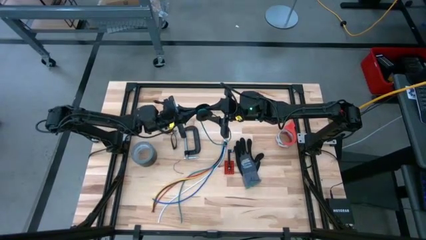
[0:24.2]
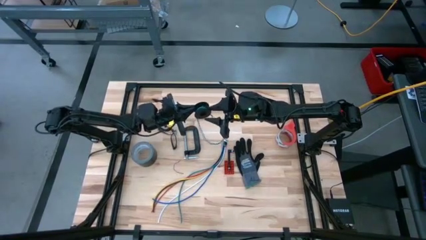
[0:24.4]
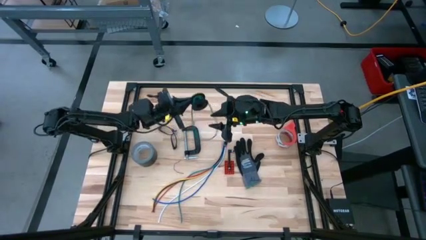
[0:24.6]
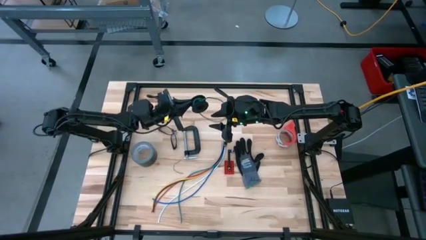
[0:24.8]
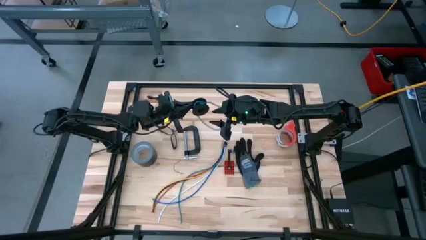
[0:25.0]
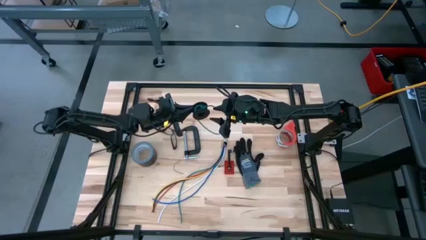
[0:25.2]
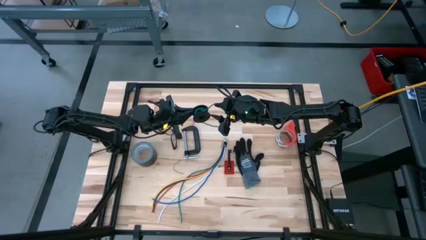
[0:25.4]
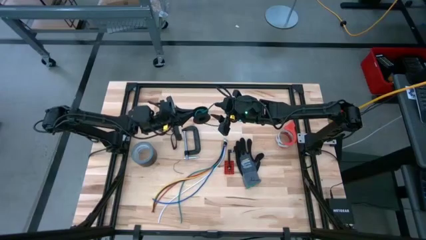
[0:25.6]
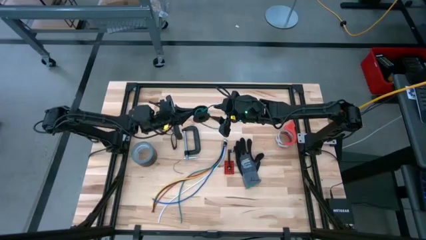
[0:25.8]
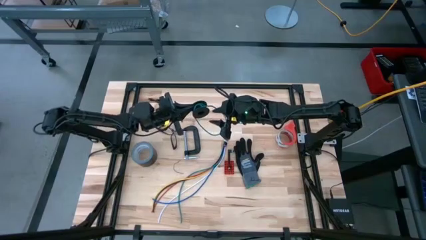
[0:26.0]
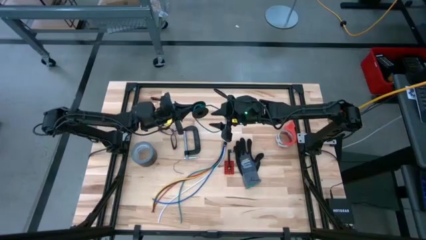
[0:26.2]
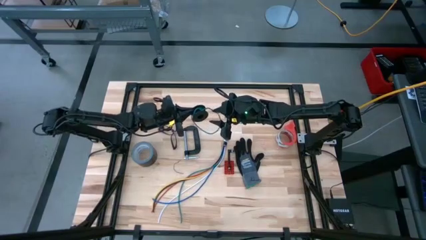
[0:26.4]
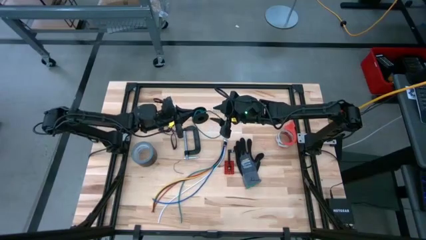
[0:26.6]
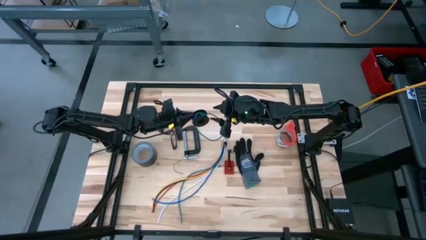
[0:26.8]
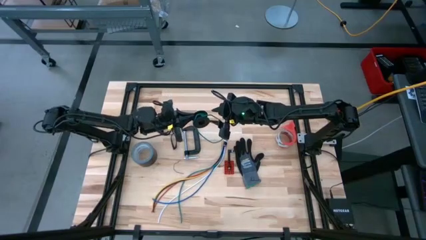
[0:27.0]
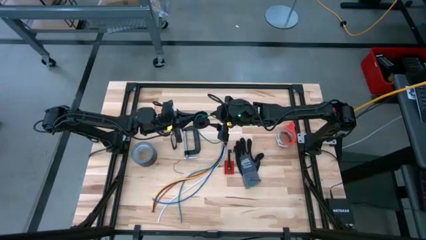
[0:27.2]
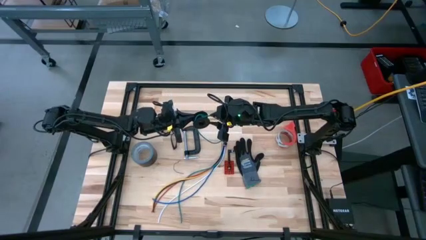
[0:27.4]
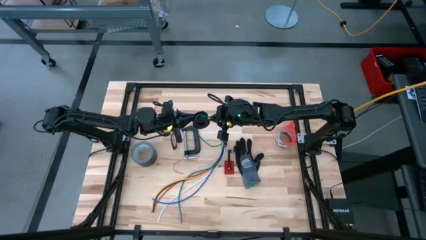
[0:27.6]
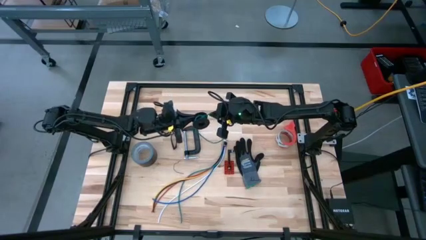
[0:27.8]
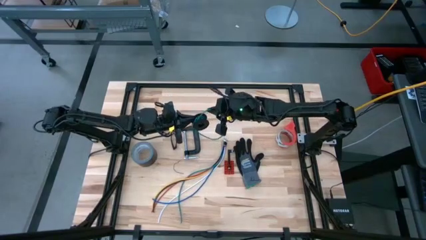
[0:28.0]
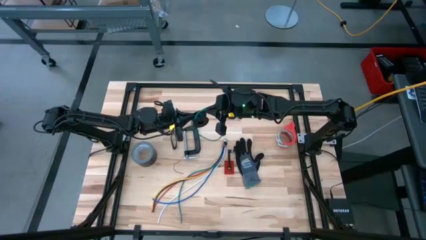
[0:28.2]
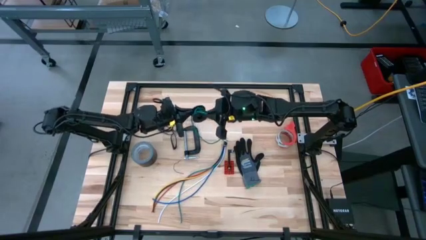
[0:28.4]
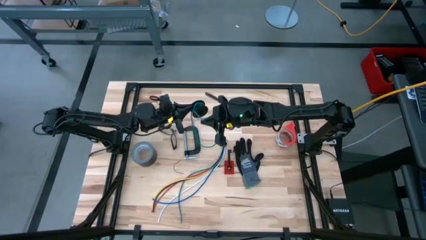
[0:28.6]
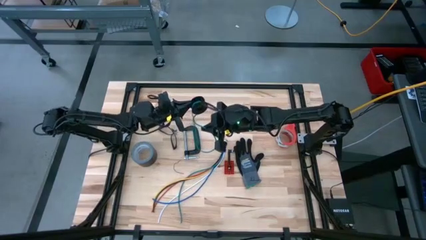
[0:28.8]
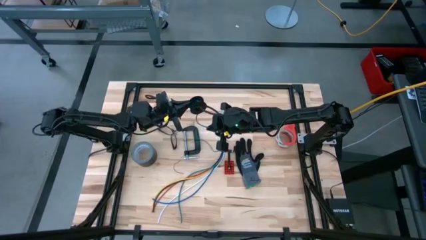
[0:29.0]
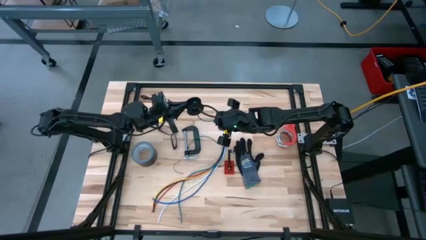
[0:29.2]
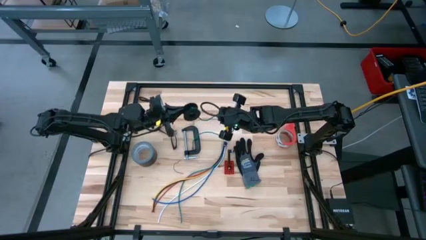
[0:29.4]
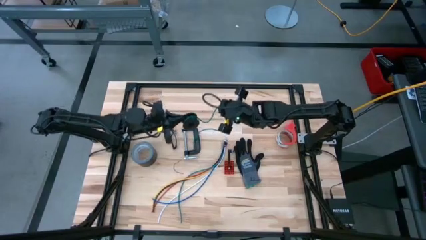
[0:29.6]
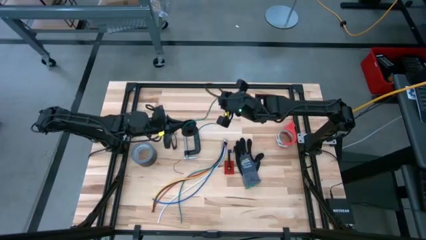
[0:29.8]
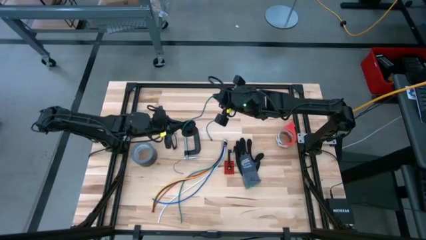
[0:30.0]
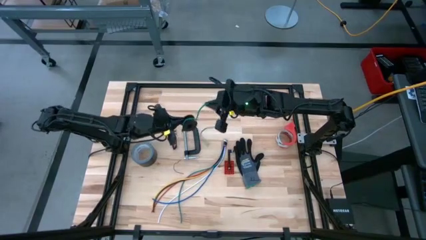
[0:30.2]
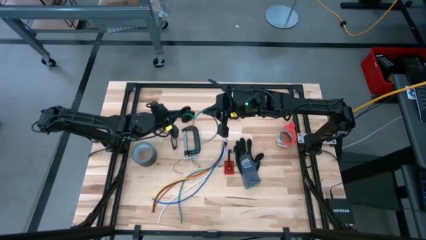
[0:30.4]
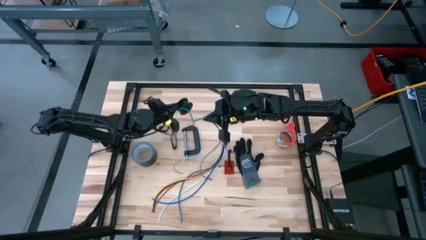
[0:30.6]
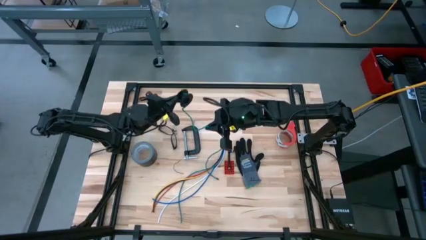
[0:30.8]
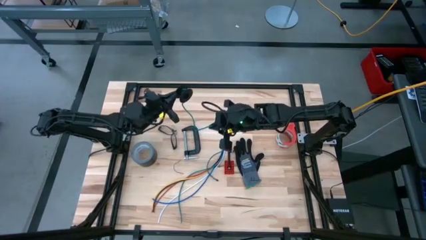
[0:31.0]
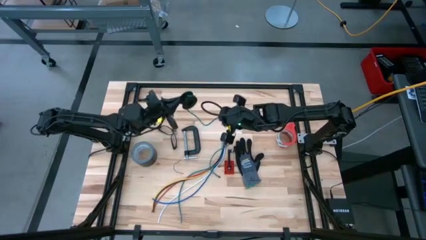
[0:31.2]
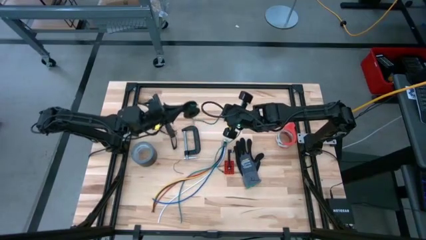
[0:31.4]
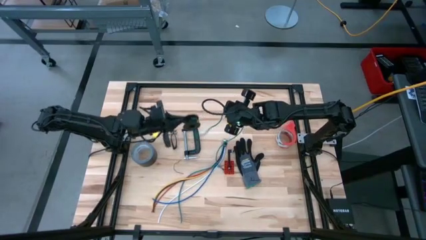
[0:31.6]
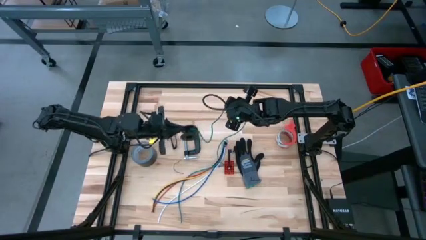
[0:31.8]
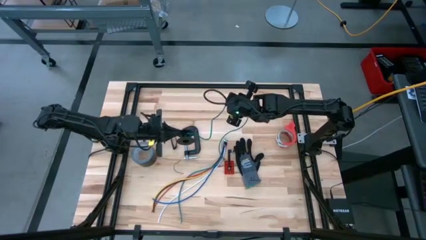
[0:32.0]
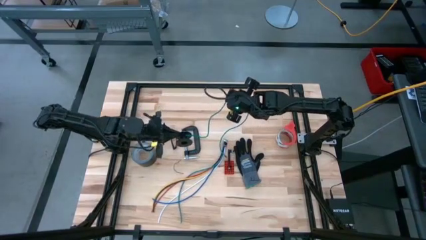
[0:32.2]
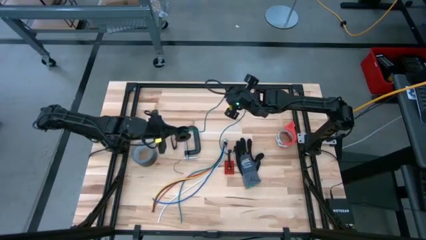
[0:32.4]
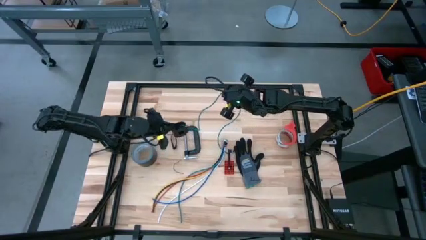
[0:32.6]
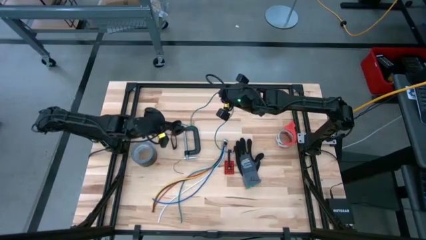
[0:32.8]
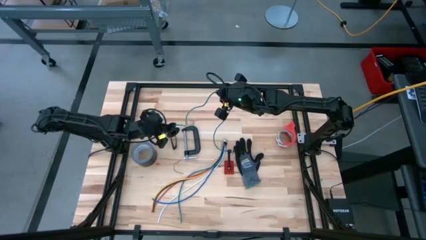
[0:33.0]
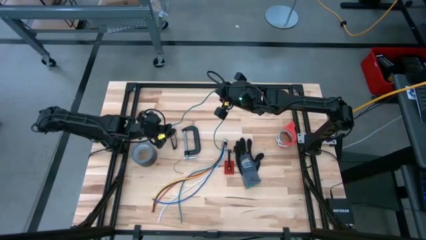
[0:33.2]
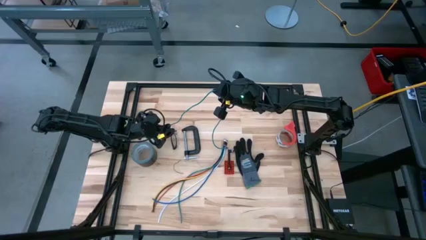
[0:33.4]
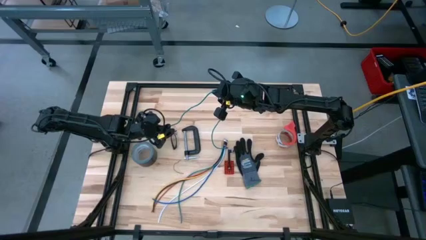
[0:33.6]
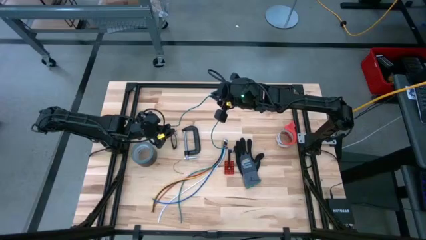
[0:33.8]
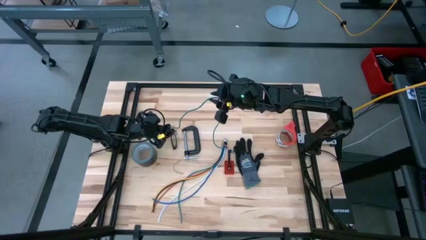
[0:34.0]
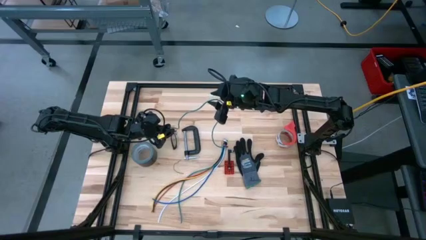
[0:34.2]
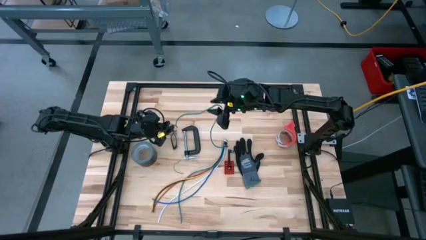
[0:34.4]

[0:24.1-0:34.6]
Task: Coil cords
Uncoil the green wire from the spool

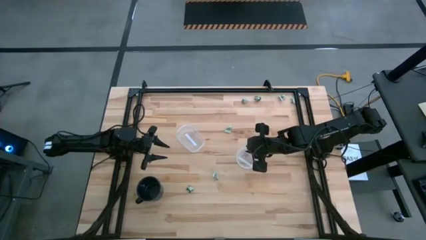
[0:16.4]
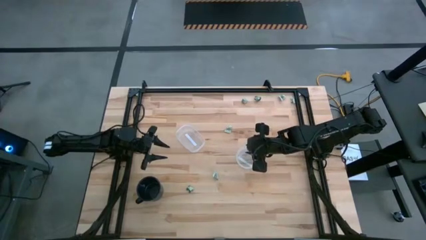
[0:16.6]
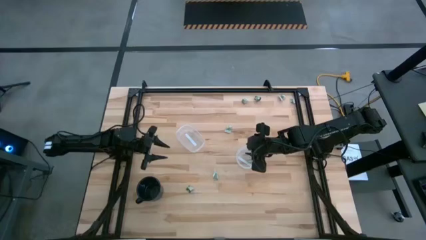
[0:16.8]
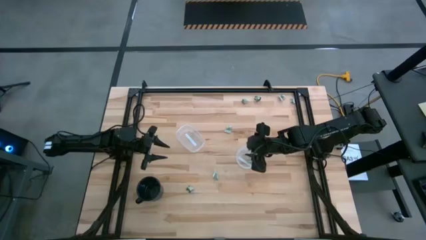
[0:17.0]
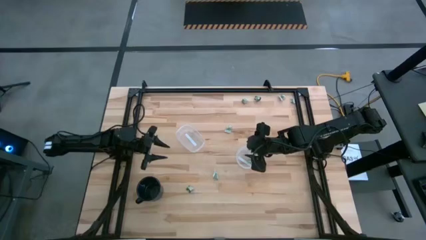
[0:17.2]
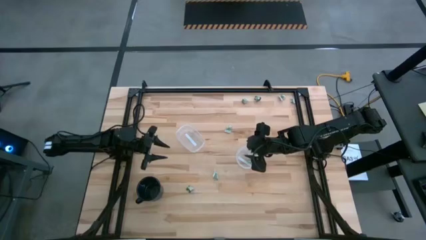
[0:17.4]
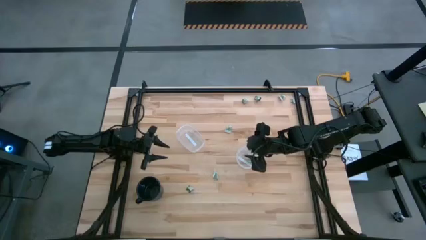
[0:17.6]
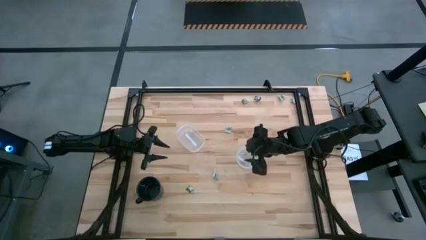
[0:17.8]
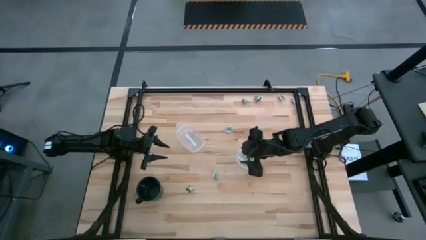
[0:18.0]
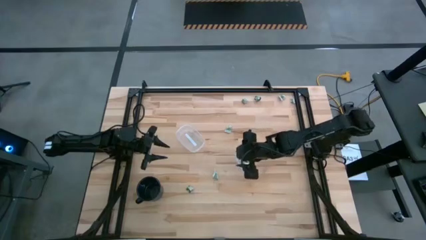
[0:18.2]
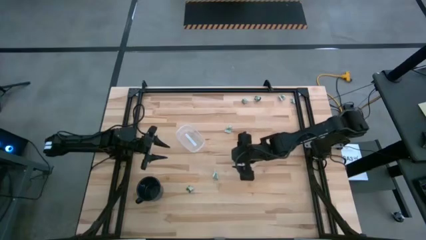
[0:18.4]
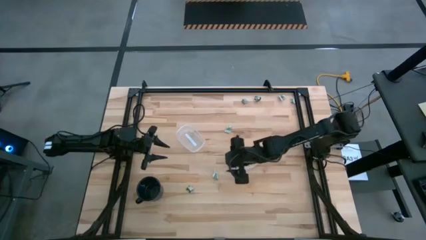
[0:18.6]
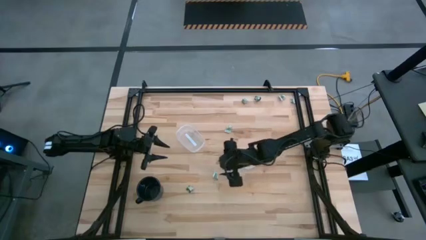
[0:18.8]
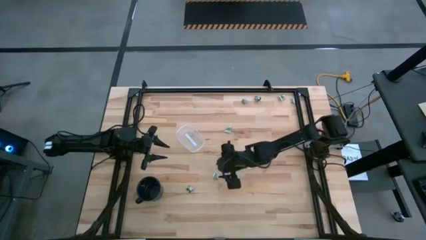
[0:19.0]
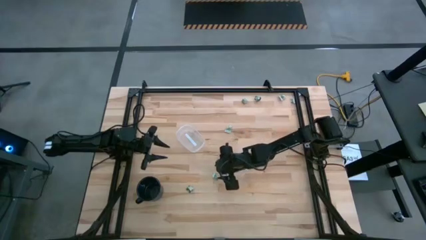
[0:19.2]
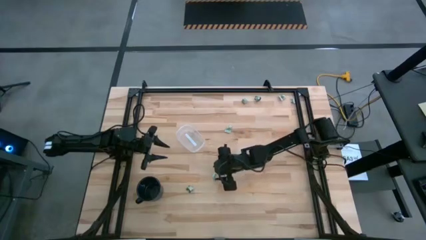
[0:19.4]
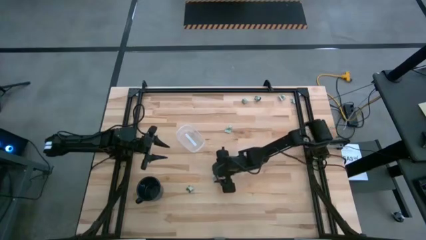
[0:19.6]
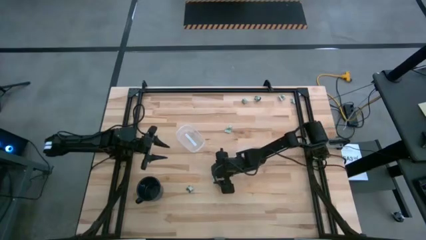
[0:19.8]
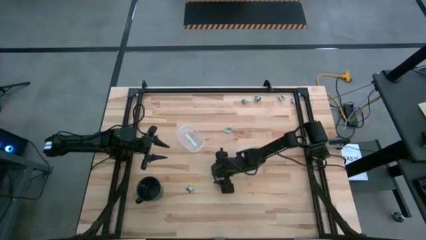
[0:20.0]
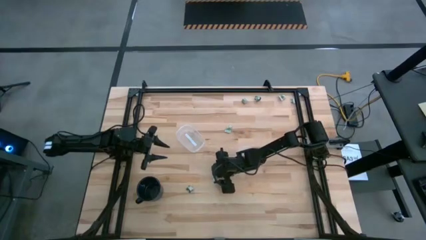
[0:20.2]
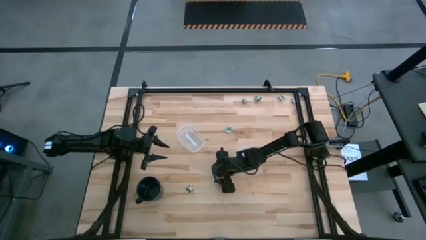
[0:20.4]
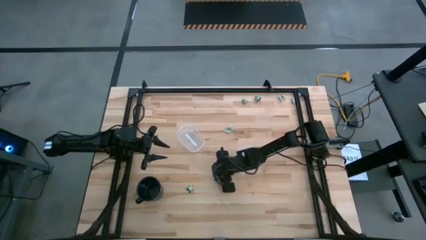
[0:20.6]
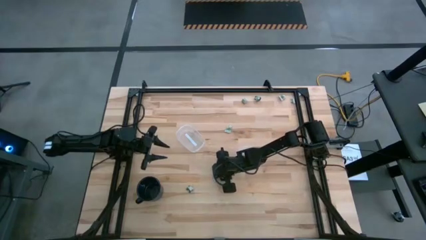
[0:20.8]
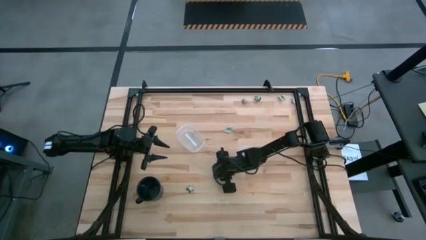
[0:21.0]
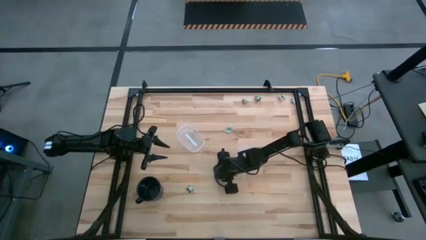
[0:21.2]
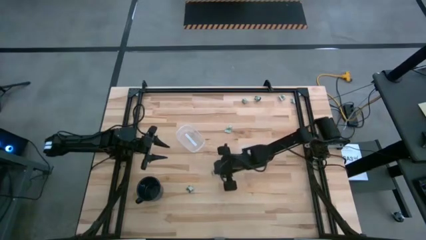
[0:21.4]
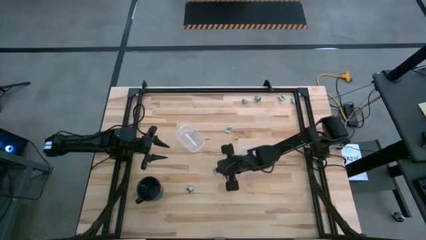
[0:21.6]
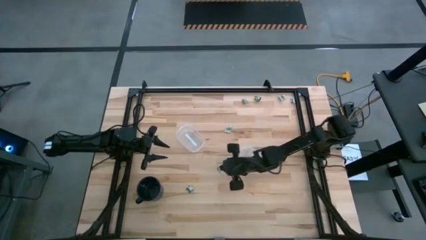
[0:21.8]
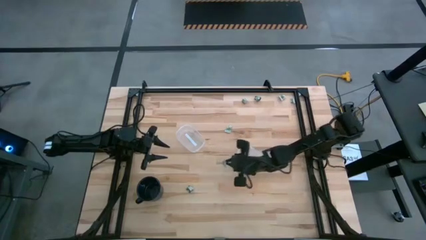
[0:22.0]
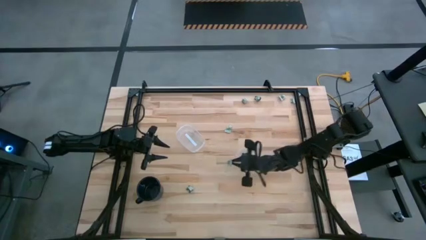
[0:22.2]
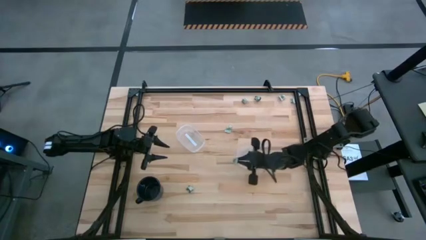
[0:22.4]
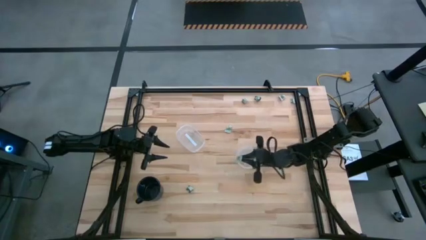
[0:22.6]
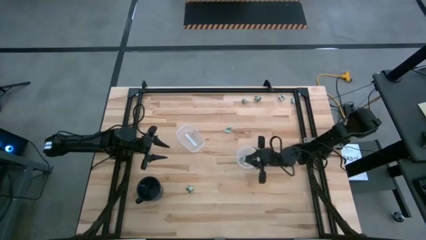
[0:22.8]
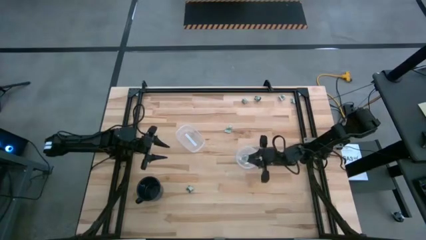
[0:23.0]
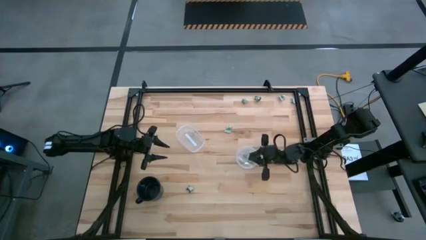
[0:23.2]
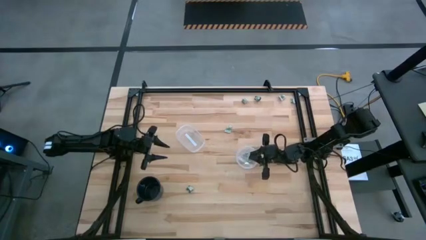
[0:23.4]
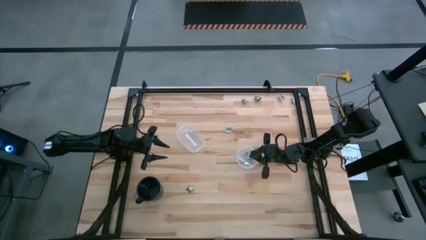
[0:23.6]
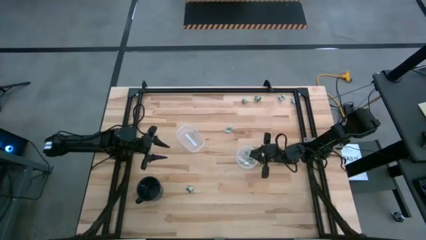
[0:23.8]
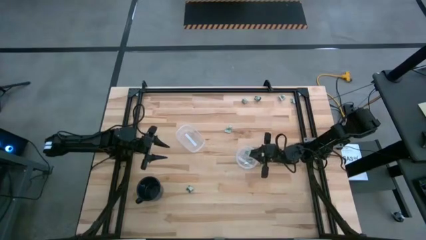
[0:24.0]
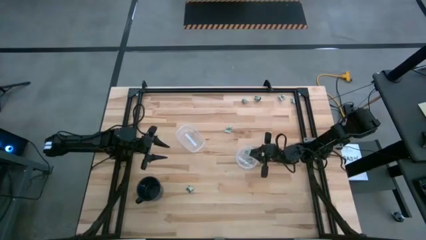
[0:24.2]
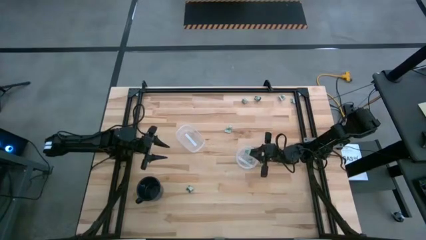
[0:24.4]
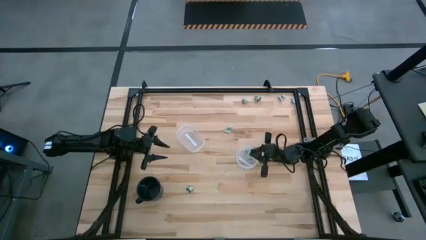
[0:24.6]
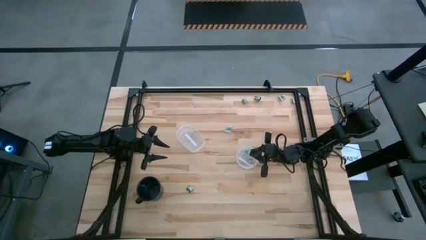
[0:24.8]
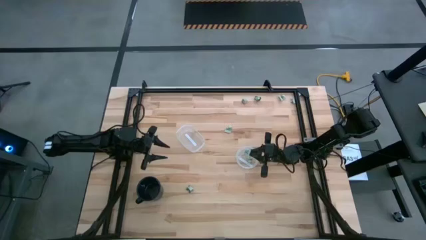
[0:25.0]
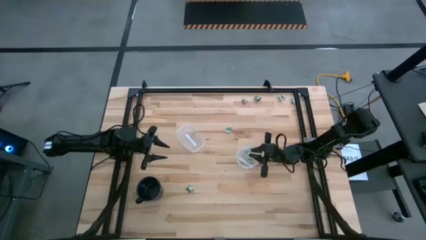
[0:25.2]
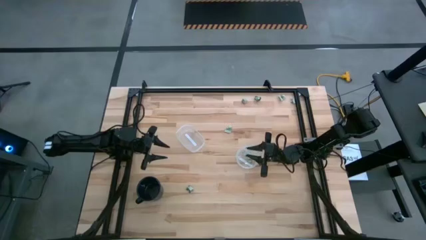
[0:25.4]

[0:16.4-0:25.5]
Task: Pick and place Stevia / Truvia into bins
Put the white stevia packet into the right transparent container
